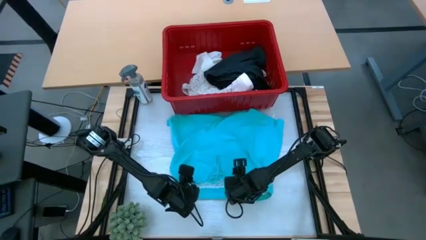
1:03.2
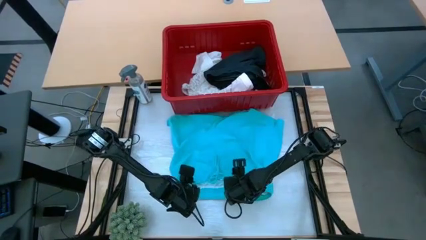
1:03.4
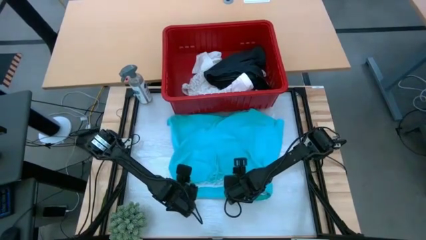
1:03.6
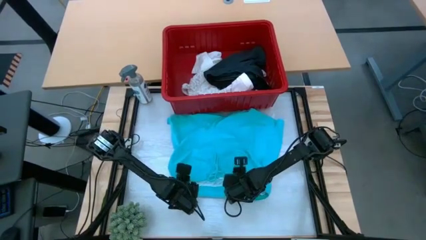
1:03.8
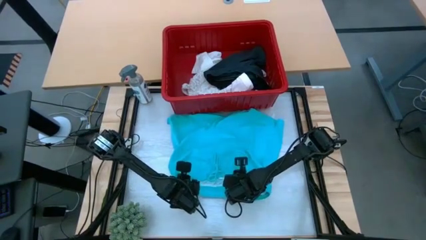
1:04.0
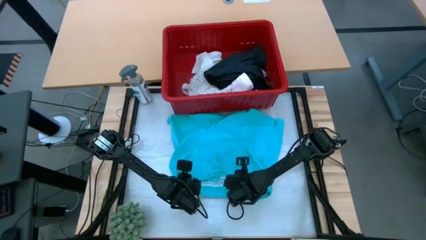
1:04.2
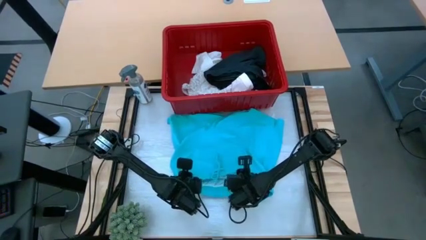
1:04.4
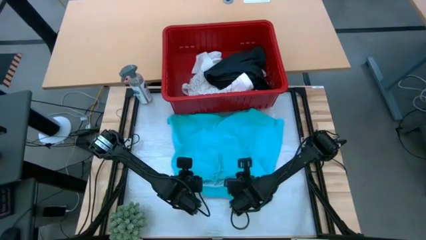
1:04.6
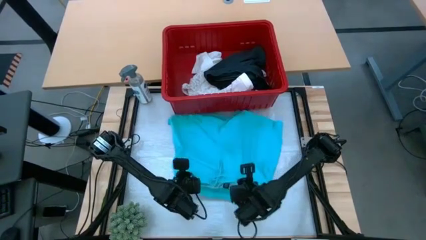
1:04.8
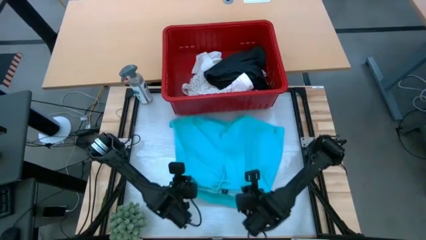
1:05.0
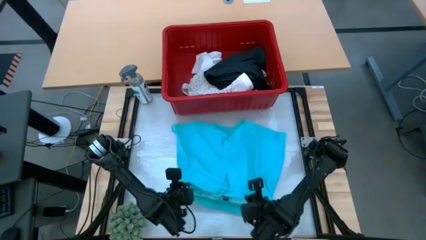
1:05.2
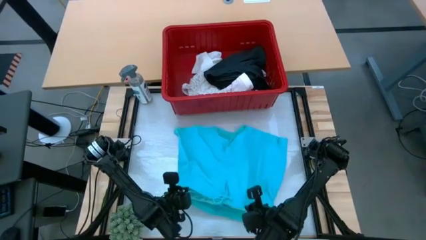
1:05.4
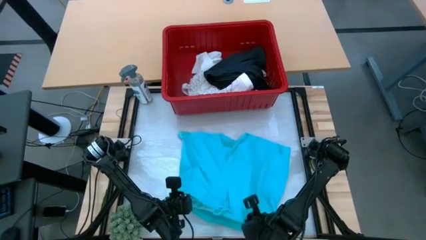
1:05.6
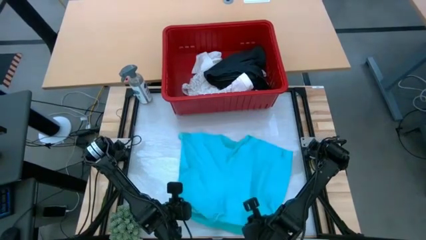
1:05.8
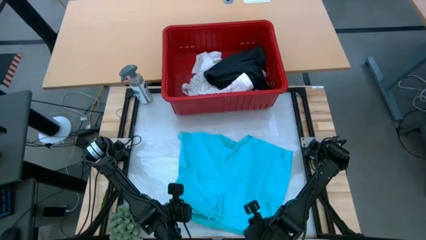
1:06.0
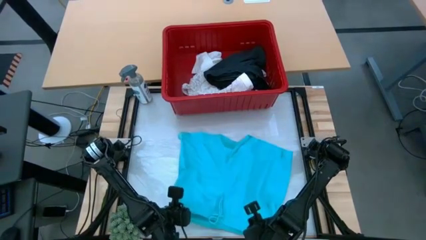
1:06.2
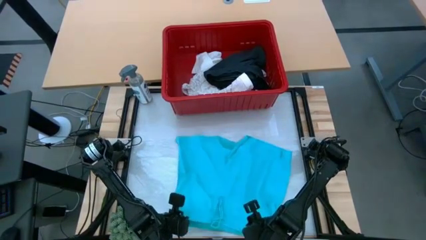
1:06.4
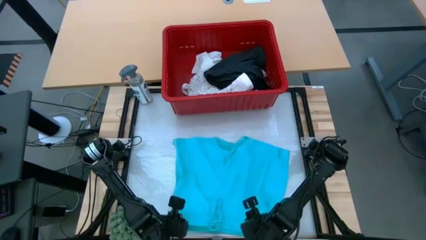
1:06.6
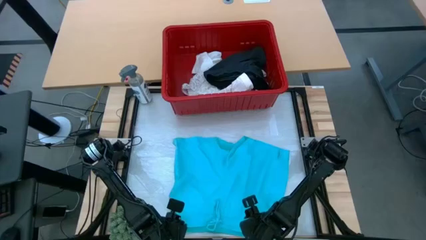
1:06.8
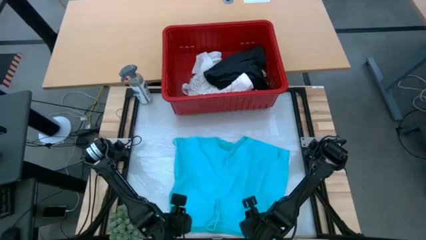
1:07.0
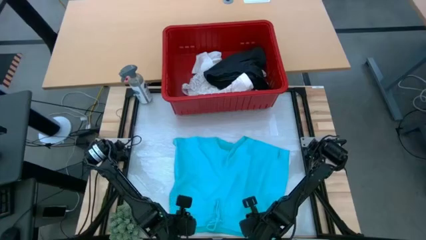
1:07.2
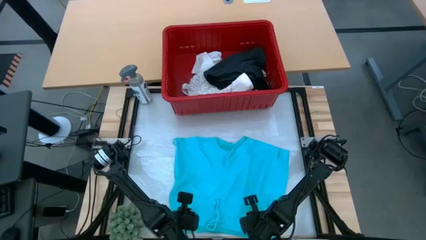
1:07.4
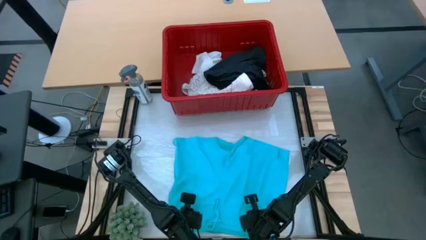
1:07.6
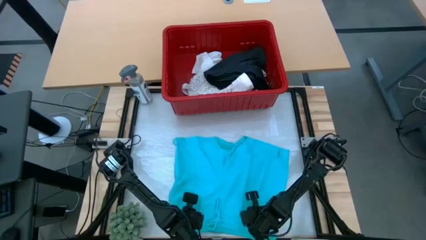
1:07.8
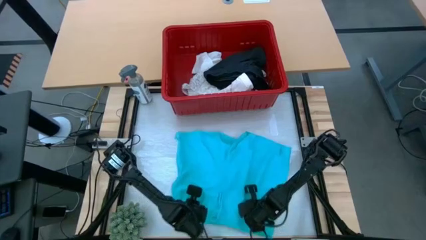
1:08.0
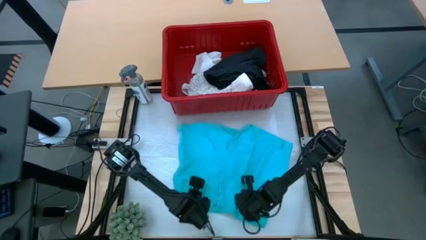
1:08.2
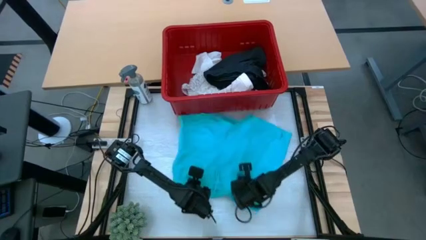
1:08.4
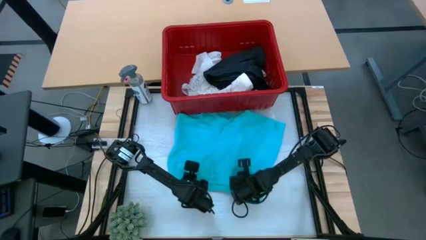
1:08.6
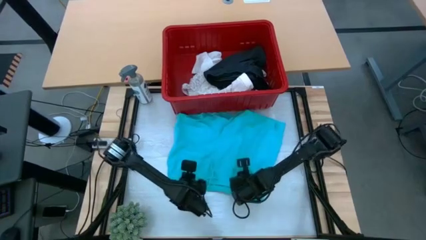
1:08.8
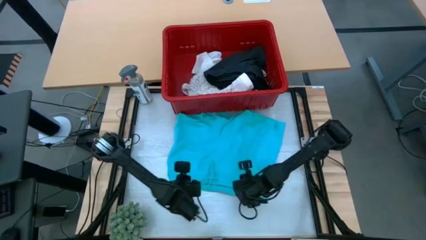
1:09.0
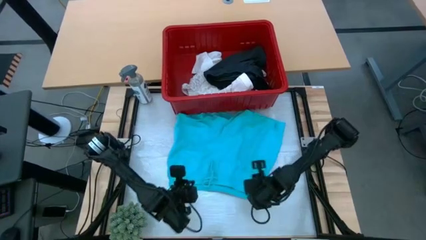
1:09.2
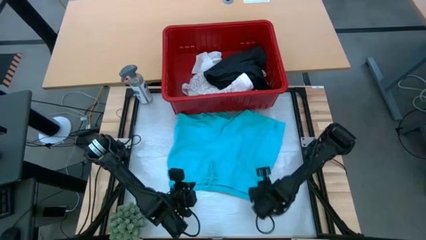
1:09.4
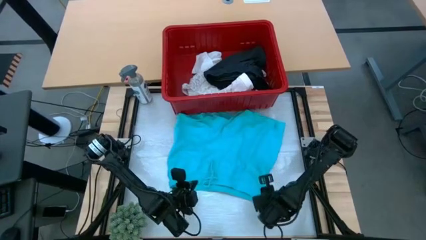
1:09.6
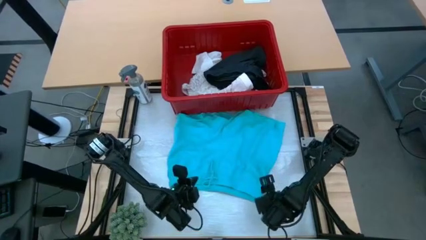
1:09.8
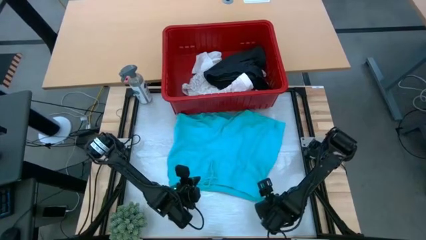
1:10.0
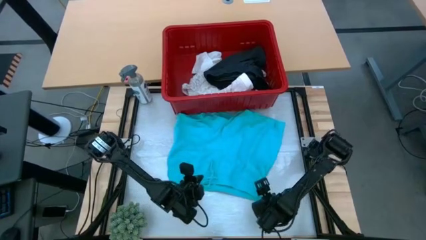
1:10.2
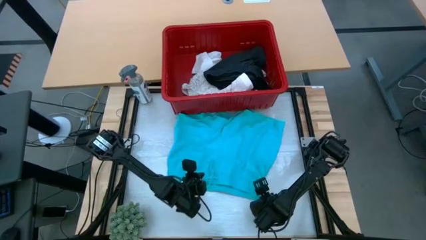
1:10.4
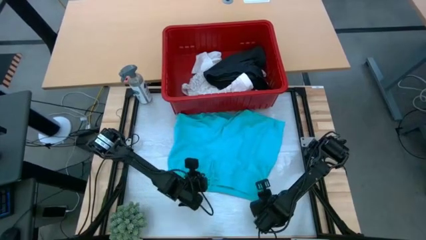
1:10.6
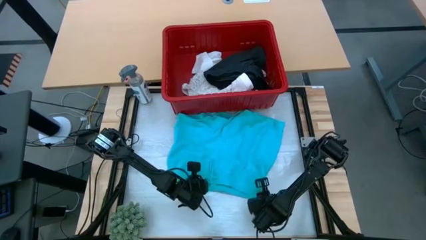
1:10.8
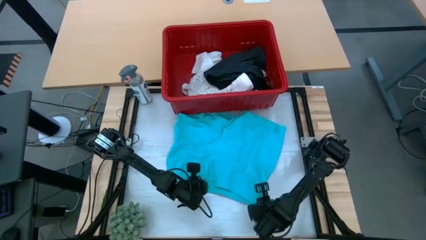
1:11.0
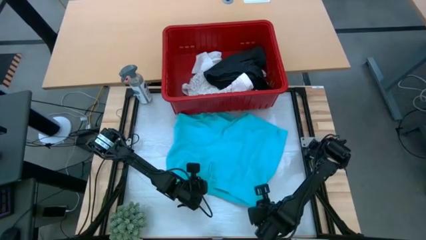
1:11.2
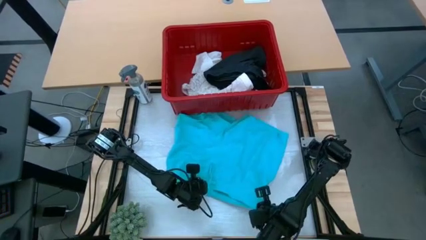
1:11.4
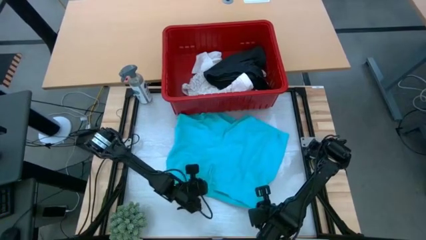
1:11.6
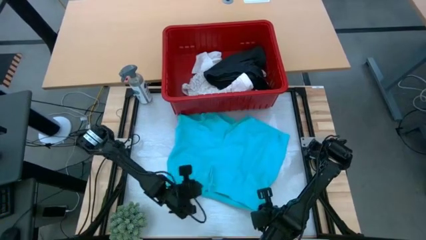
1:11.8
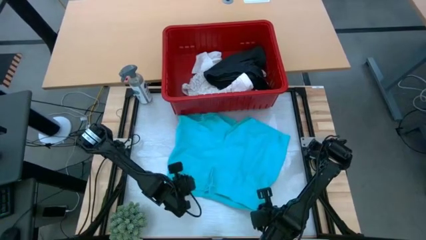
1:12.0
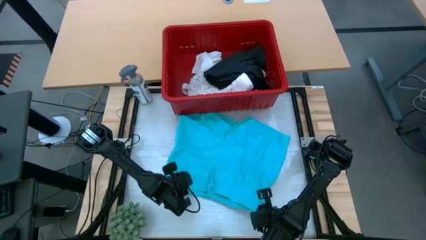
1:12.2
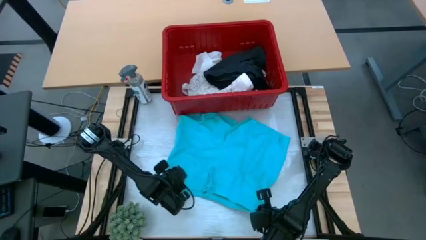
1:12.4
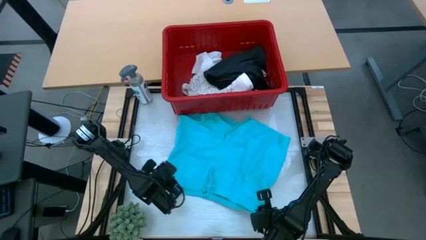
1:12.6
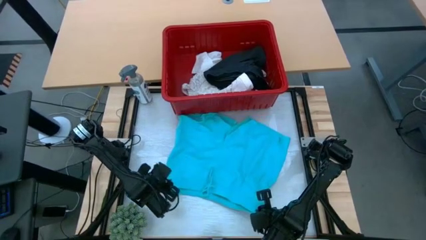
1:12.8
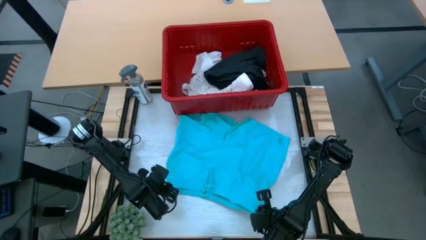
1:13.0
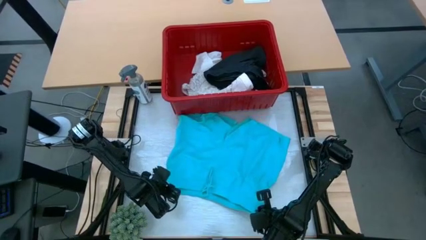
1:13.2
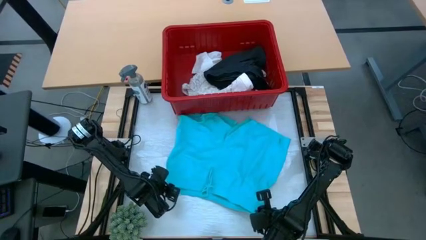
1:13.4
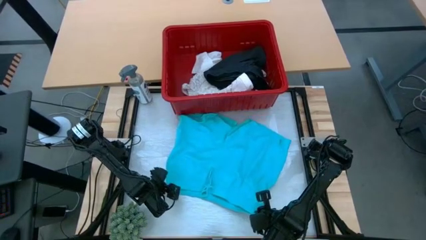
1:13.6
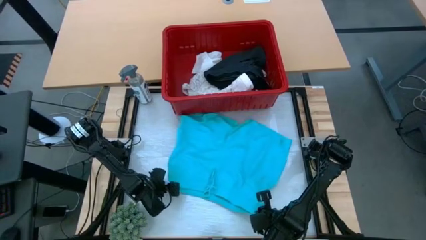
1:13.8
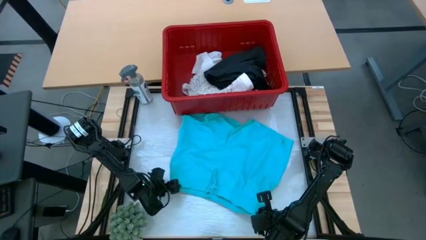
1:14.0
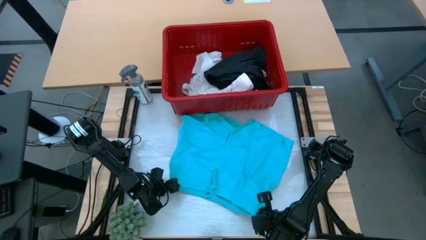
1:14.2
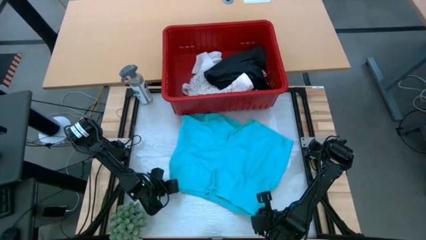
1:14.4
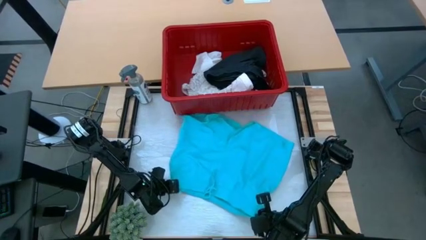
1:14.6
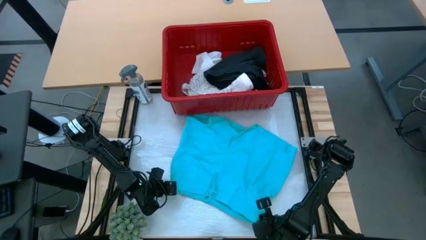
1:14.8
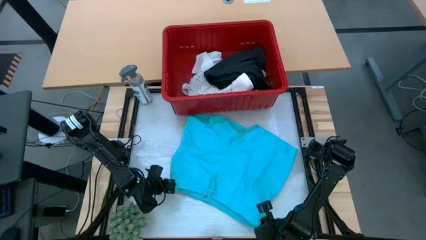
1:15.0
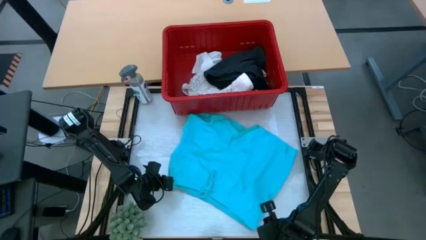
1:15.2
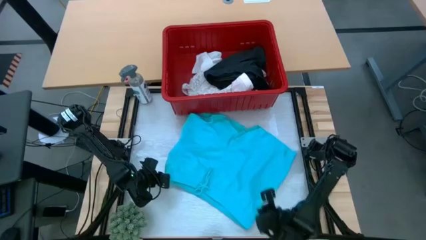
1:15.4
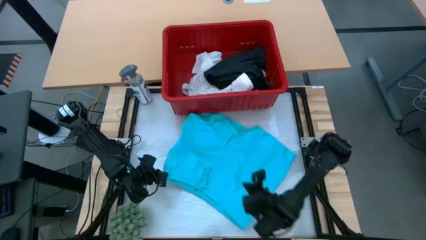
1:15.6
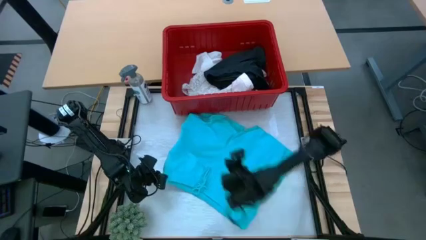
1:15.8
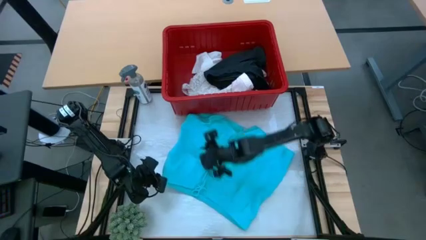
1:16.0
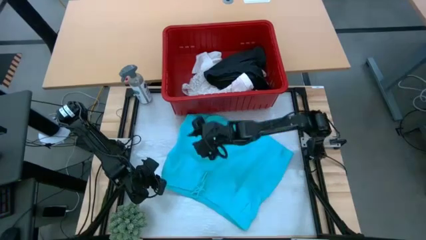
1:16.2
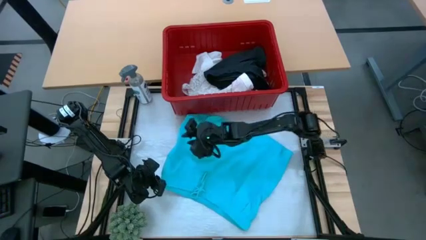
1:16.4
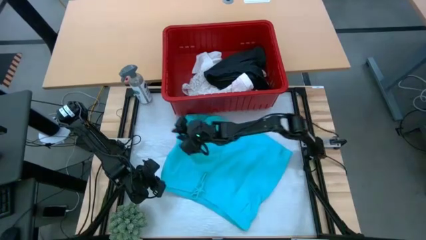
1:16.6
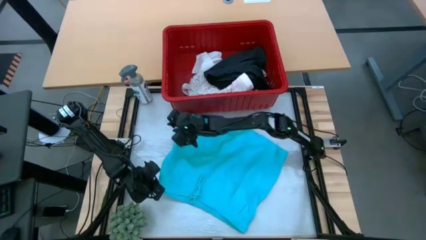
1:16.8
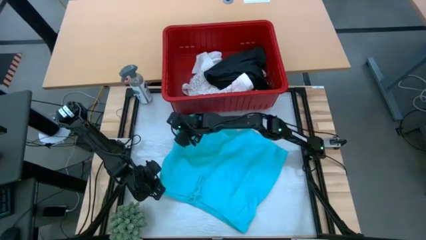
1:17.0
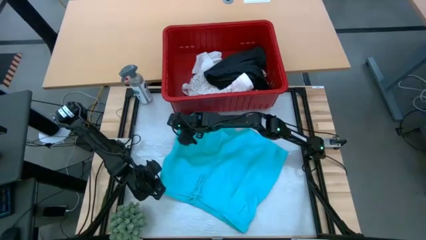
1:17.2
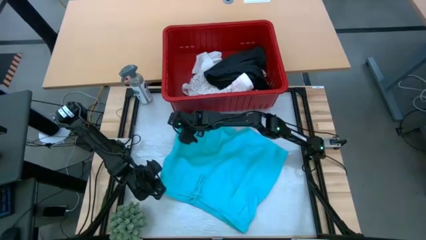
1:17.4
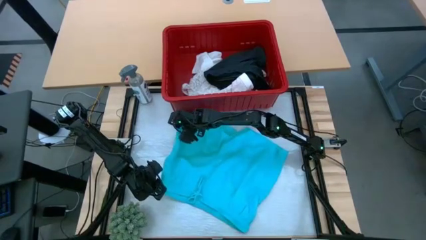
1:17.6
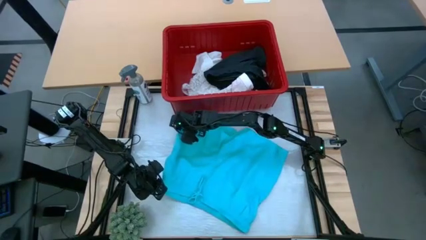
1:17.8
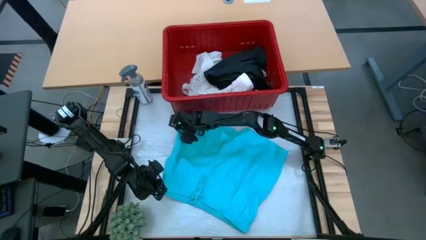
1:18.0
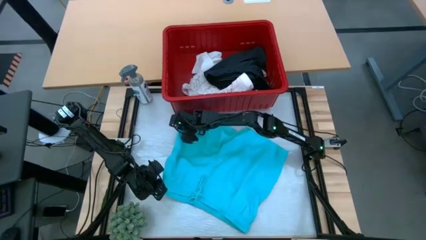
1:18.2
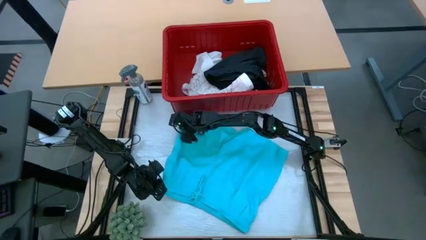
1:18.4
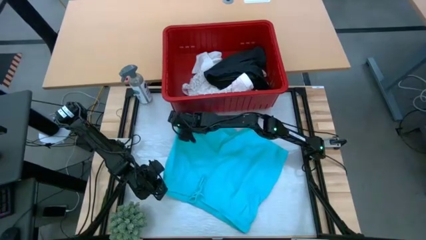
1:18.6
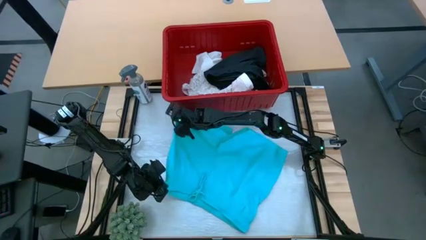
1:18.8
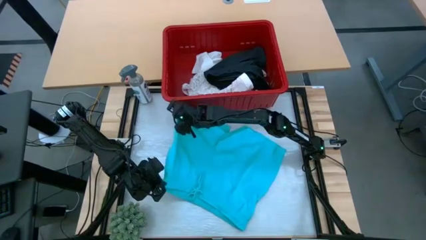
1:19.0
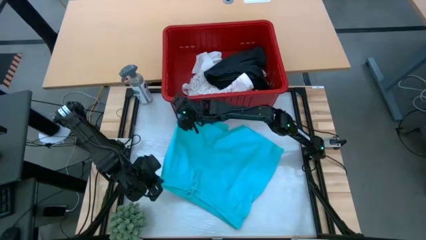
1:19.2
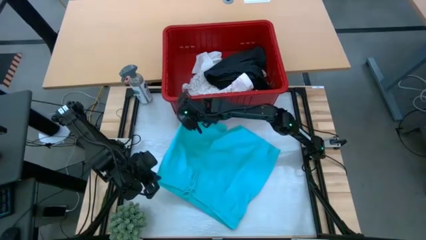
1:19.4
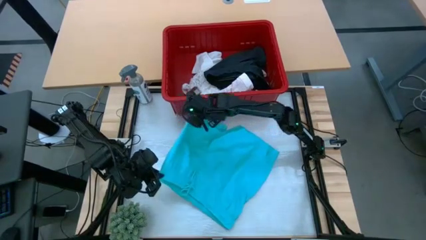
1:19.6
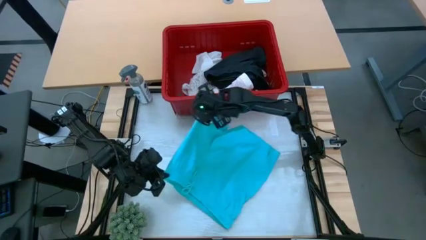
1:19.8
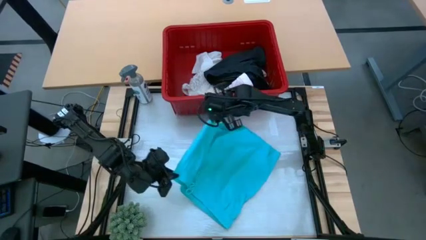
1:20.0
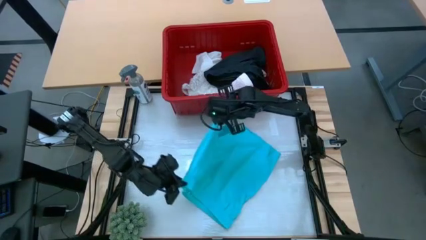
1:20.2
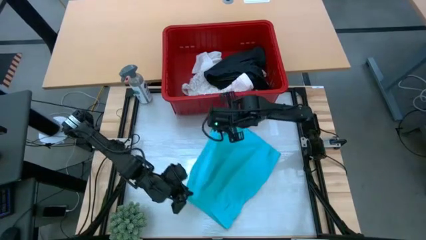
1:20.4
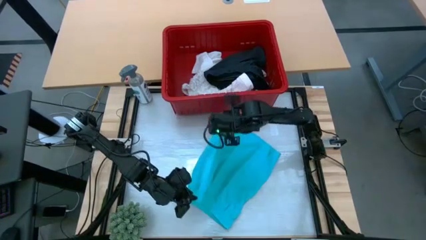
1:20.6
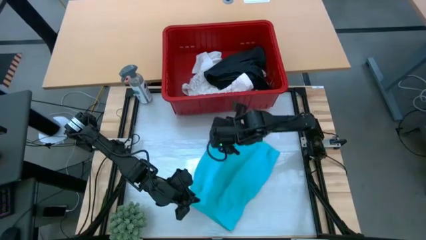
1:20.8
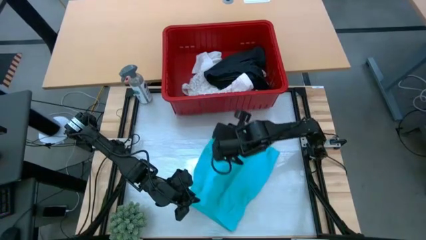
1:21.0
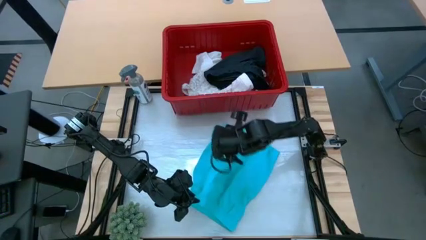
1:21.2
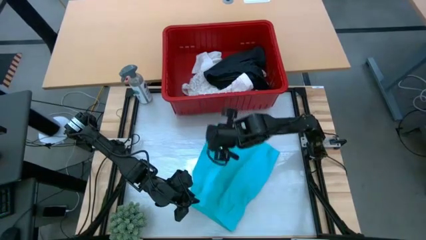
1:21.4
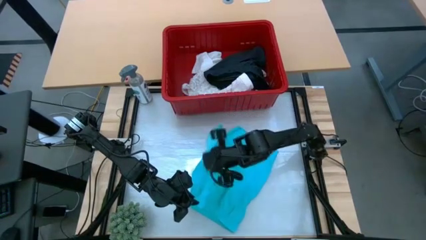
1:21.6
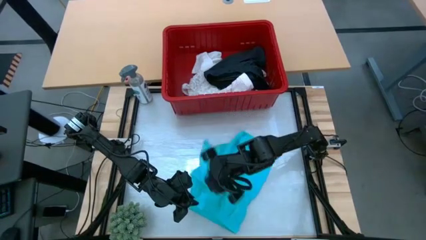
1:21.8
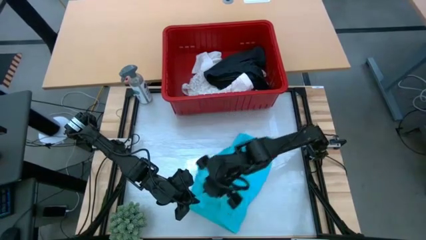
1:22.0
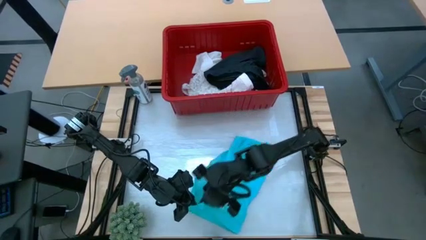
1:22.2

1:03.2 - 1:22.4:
Task: Fold laundry
Fold the light blue shorts
